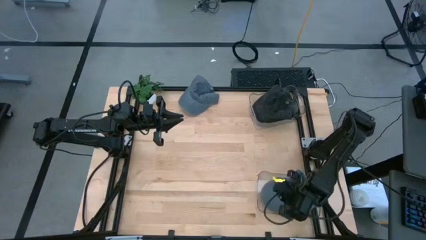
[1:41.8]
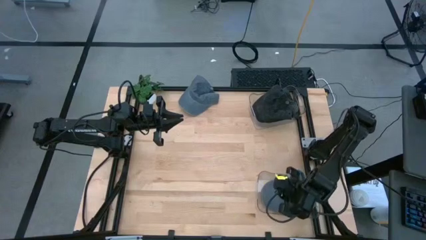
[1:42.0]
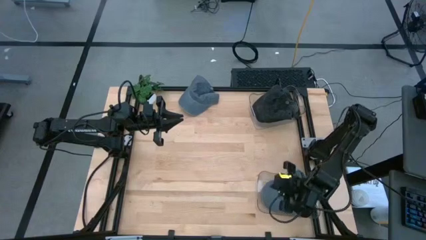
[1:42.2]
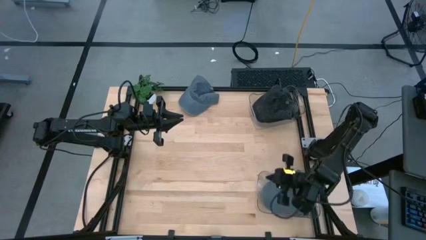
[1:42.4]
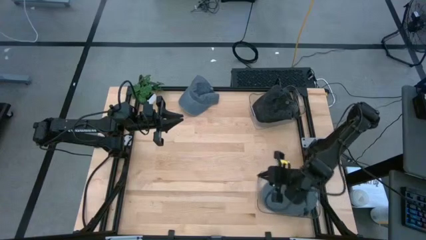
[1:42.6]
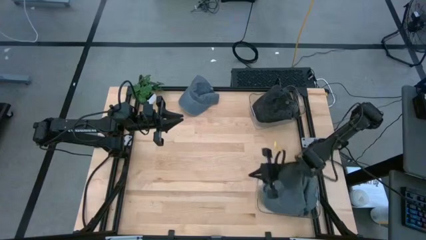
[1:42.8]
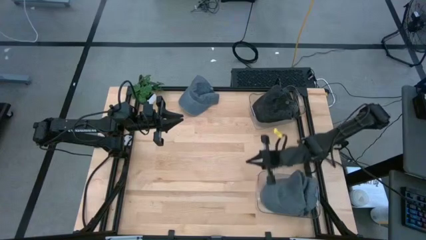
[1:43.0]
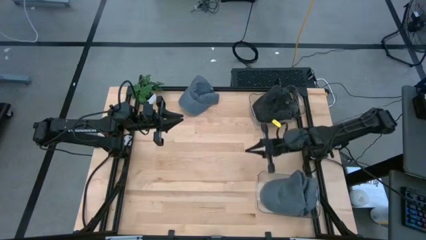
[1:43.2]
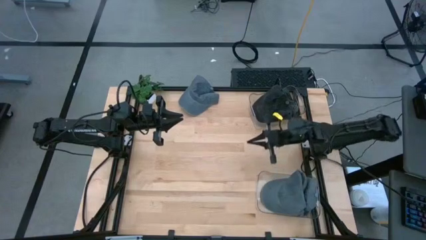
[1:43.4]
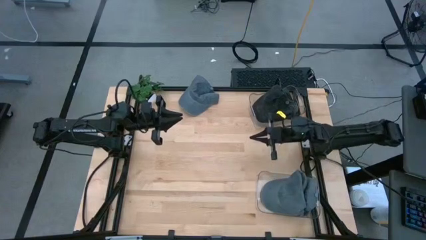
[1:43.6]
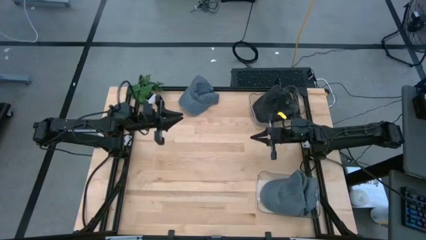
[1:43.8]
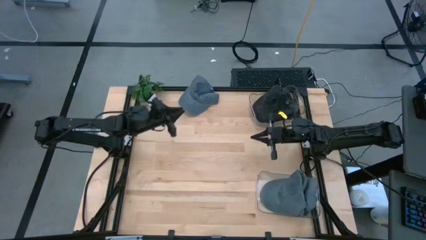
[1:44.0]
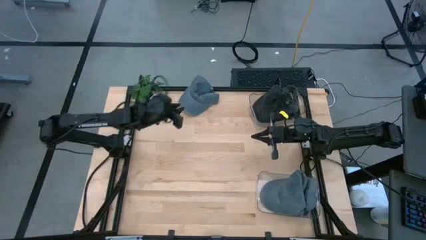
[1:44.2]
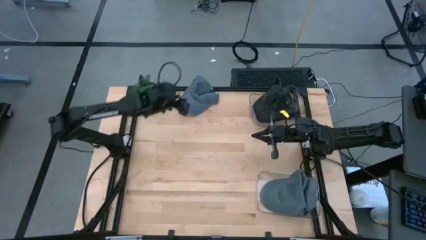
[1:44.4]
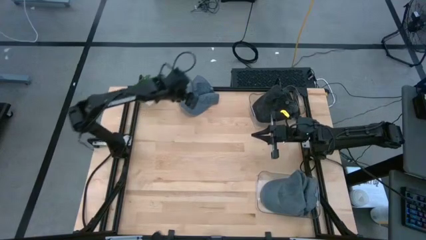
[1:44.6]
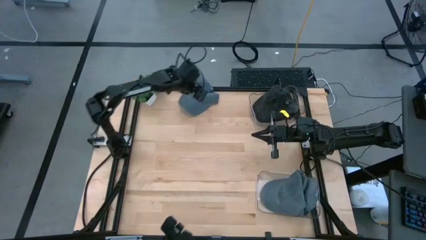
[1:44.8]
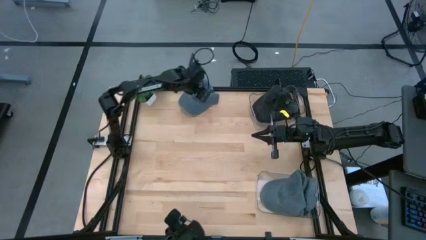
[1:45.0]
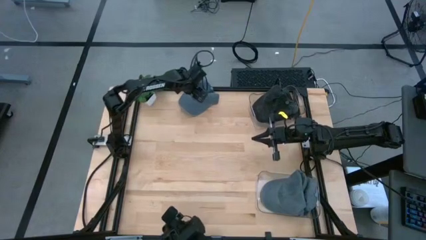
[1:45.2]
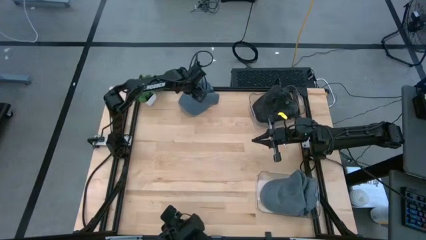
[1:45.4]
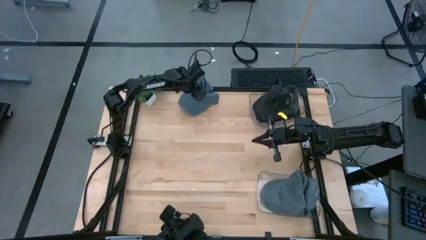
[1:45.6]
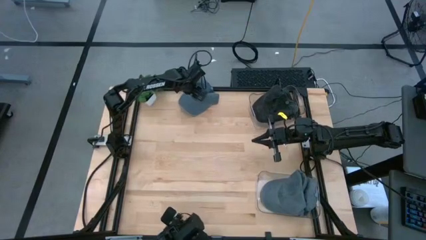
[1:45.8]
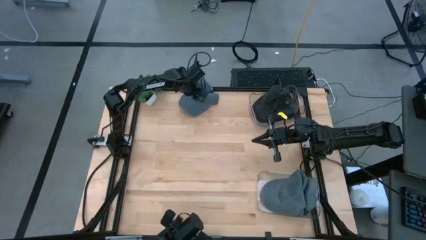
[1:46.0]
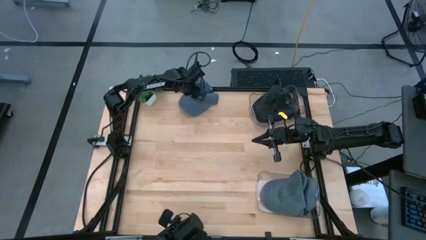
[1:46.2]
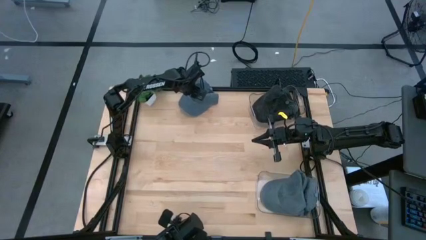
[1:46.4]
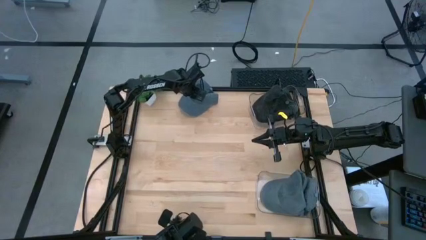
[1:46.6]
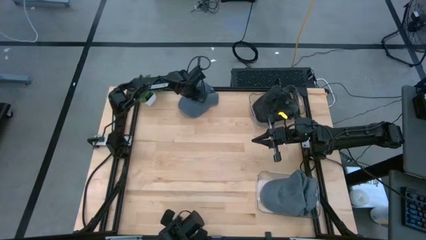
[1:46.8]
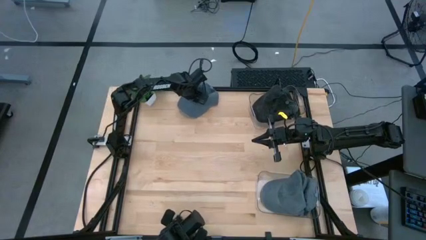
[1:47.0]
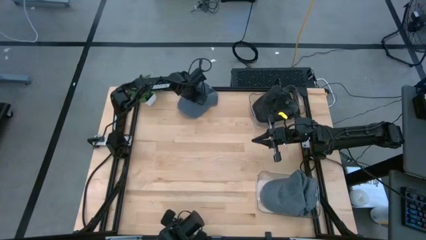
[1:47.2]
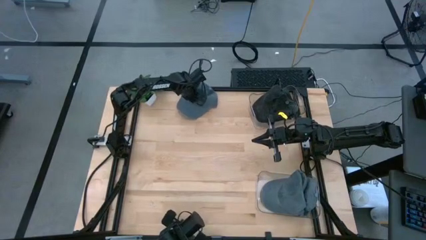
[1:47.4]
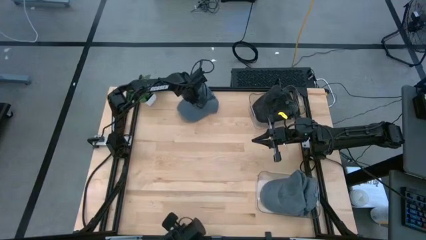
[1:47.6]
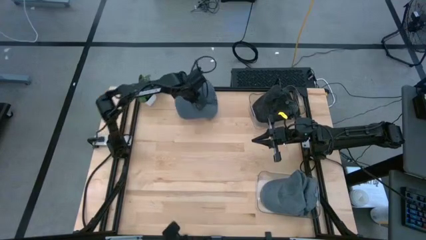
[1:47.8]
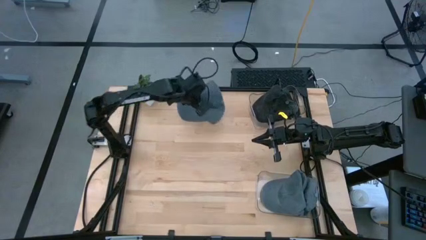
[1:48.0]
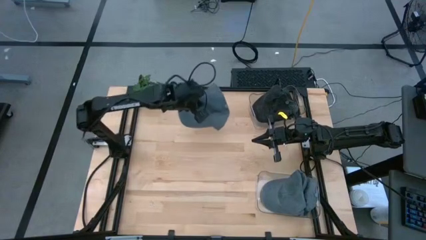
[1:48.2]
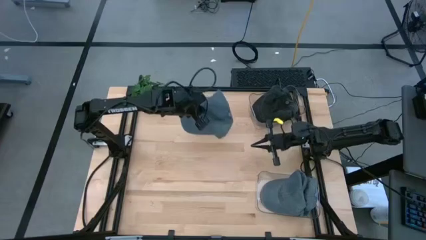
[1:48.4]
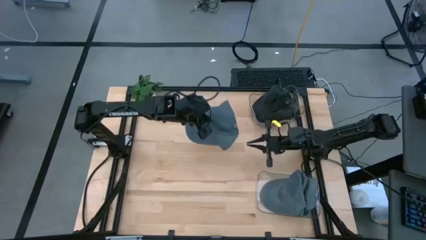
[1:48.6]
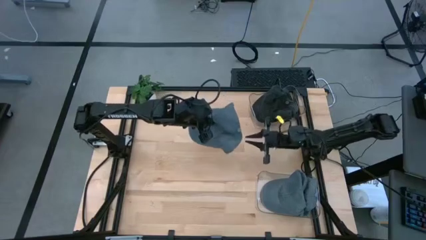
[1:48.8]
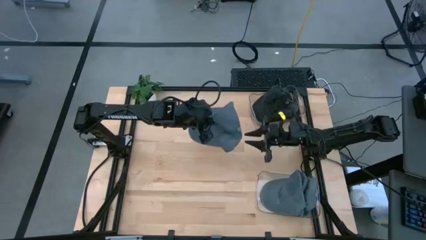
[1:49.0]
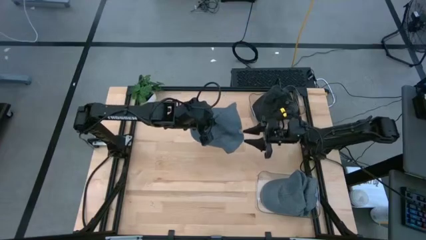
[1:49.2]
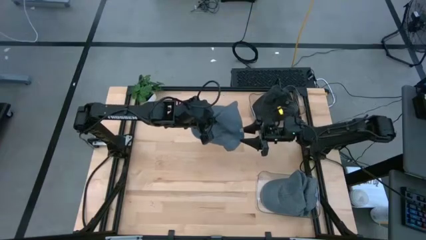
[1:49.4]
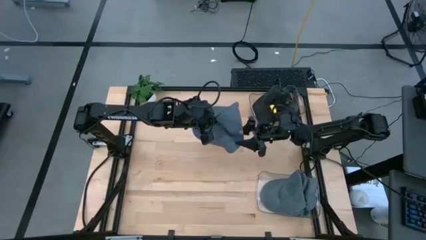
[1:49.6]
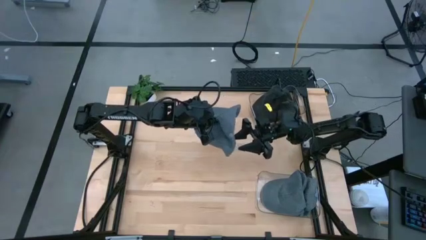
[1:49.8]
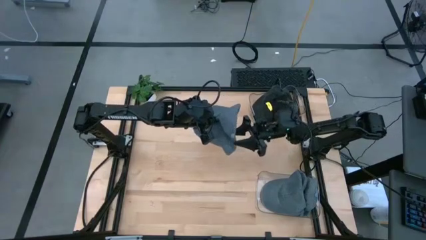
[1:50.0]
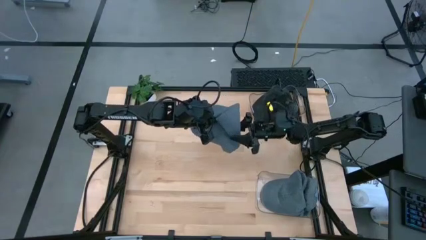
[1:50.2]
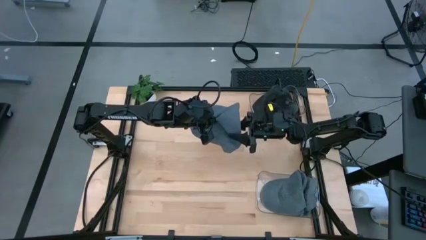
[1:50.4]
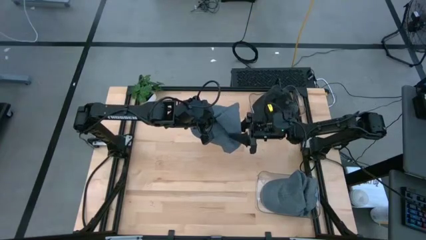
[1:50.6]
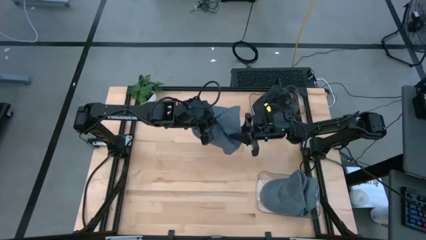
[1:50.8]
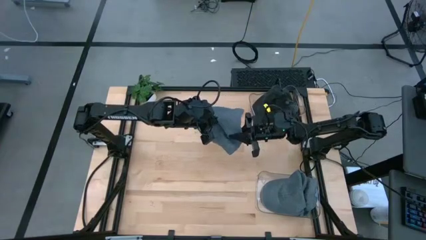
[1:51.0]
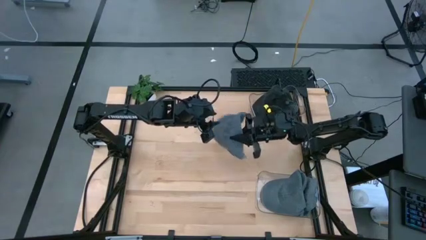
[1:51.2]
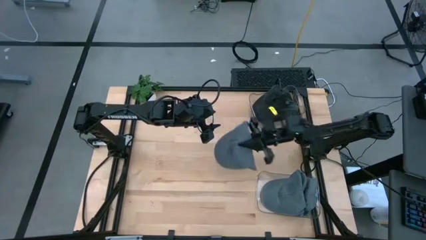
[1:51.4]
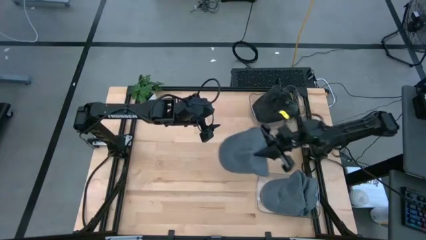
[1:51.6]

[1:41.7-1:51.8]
Task: Pick & Place hat
Put the gray cap into the bottom transparent bin

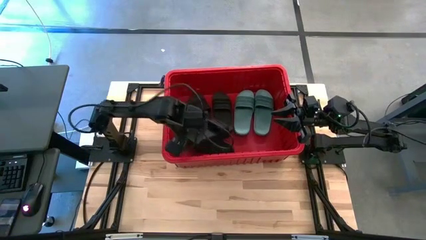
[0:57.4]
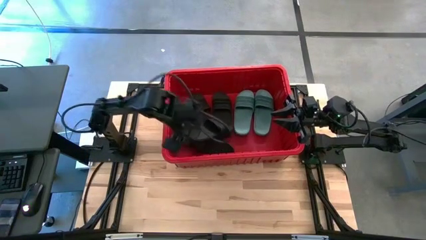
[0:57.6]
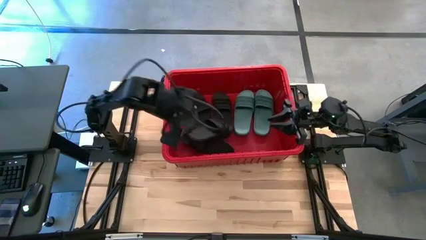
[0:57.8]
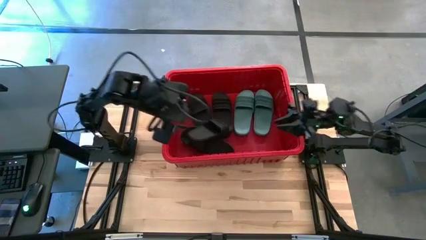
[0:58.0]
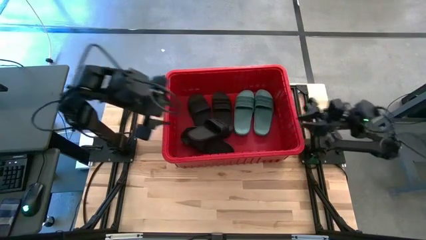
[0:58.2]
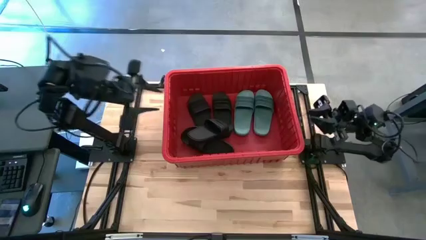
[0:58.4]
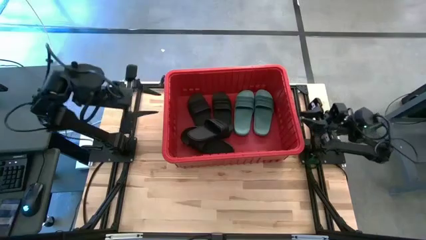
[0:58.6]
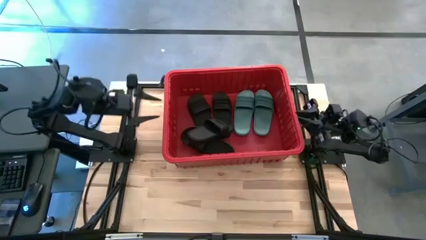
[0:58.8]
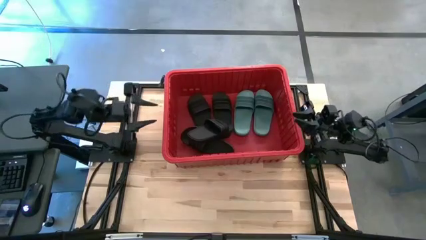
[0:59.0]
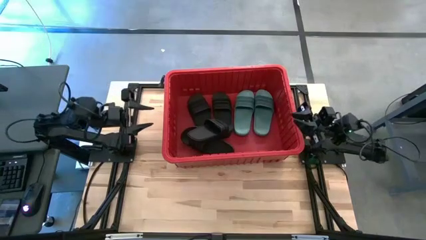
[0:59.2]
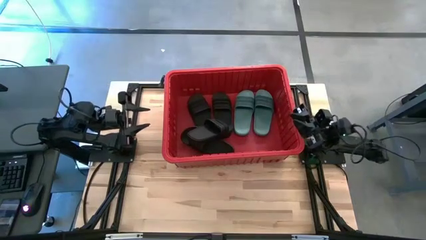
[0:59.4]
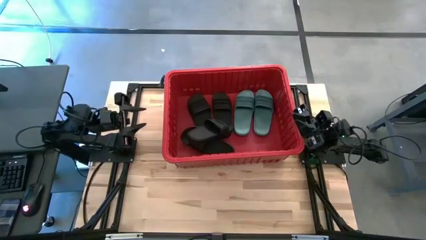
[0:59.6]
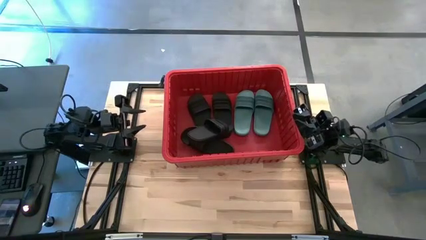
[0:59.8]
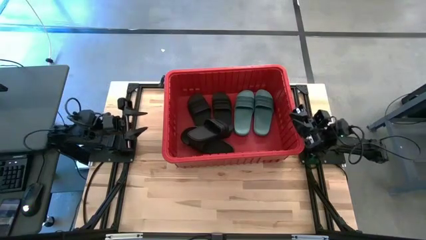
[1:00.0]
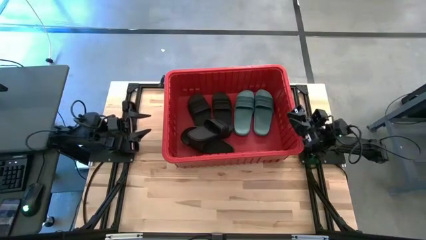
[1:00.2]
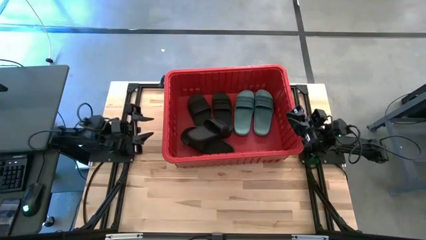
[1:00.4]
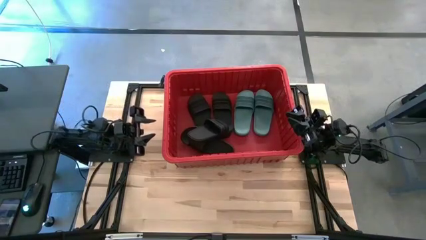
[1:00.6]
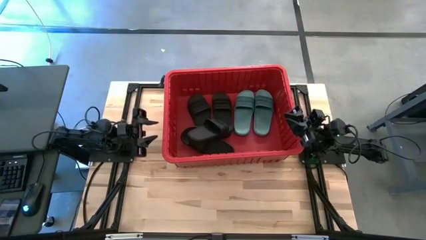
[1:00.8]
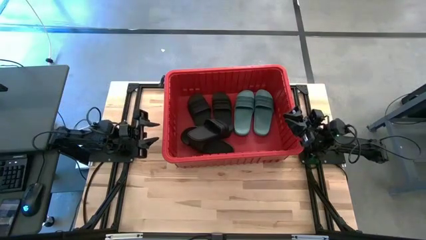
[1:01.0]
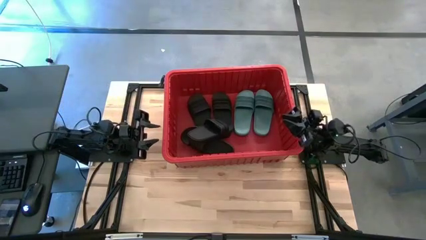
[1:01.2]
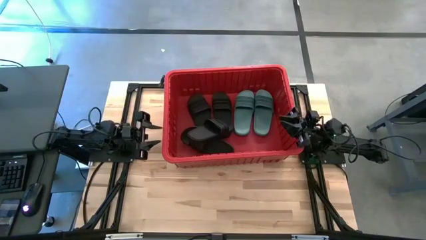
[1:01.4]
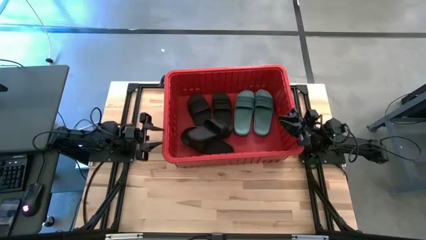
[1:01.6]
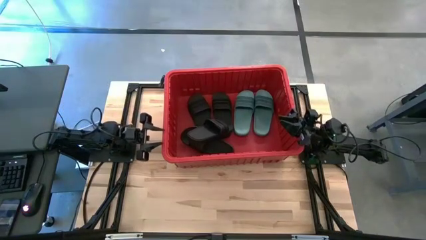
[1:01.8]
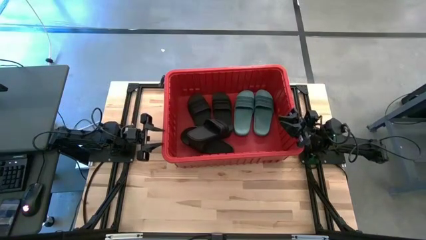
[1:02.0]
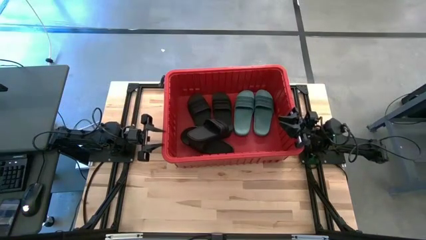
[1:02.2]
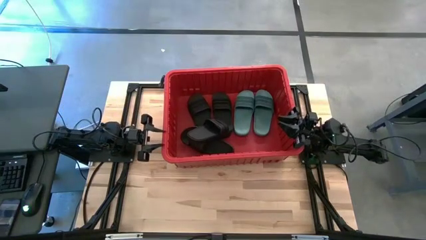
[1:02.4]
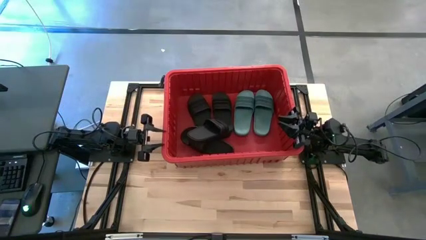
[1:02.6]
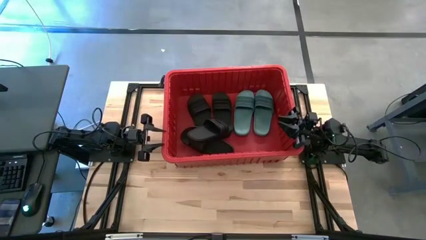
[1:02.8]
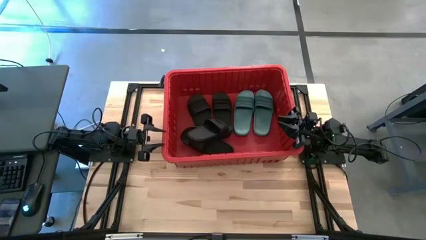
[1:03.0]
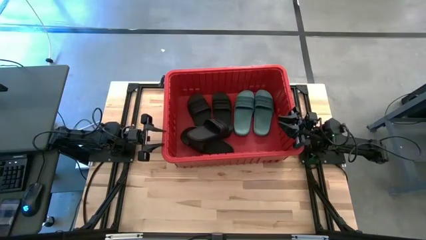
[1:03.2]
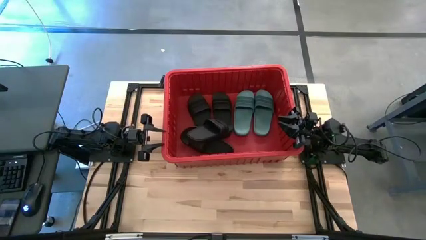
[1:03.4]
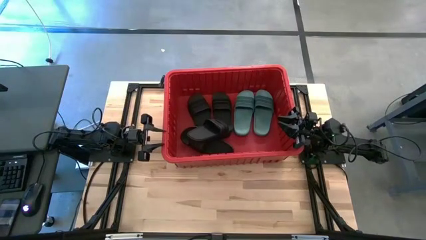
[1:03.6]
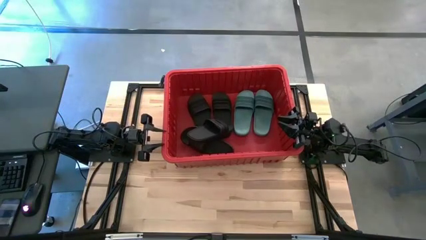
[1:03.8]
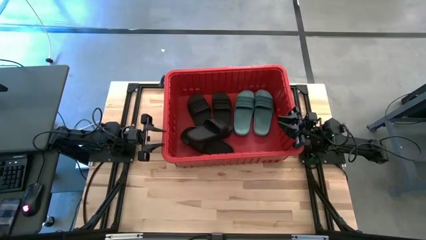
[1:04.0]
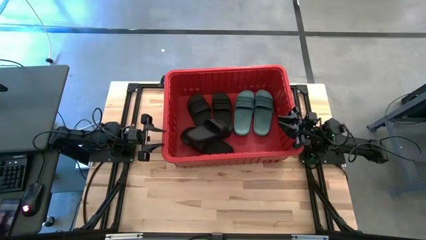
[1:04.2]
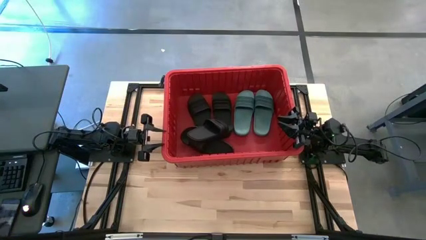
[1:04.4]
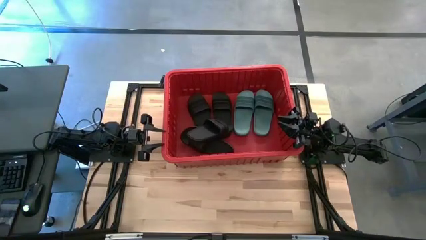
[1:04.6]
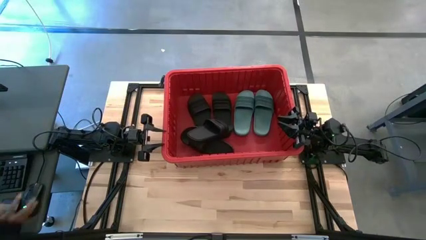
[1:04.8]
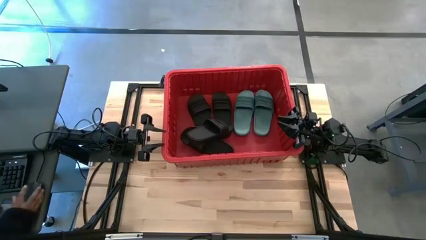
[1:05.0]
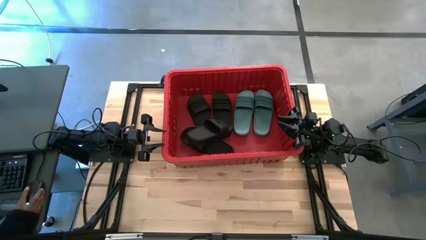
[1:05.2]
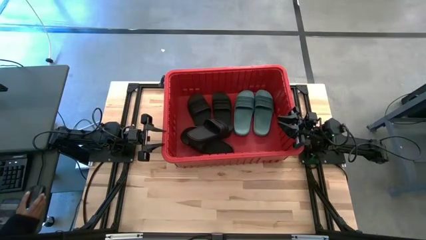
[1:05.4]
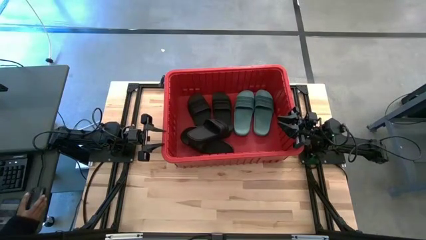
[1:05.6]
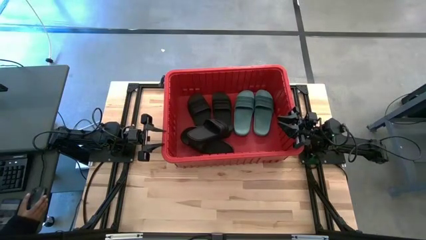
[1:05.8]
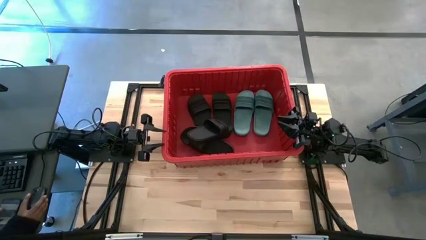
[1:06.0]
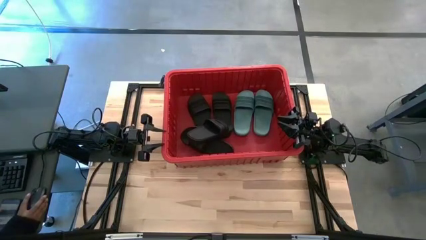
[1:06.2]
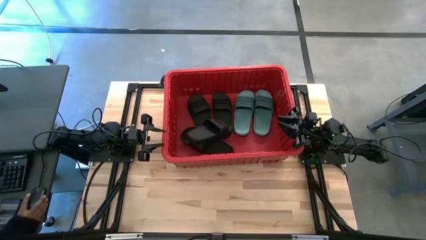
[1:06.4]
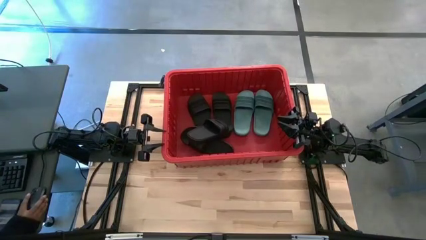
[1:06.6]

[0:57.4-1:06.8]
Task: Pick and place slides into bin
Return to Home Position
